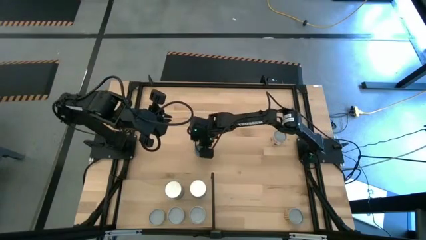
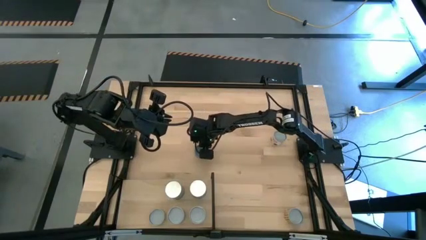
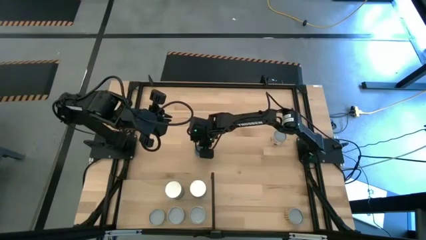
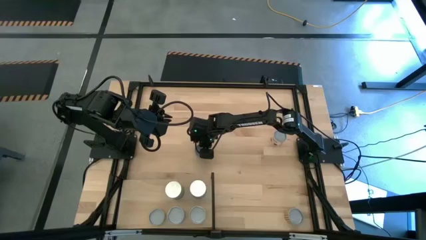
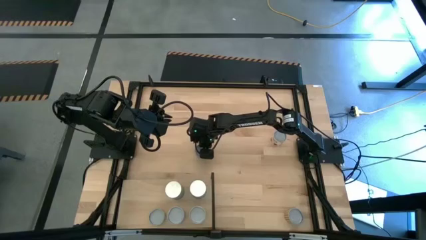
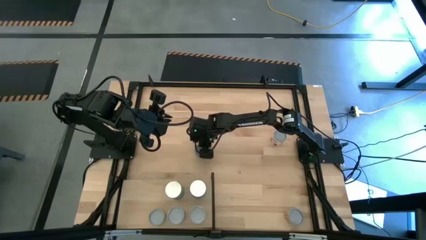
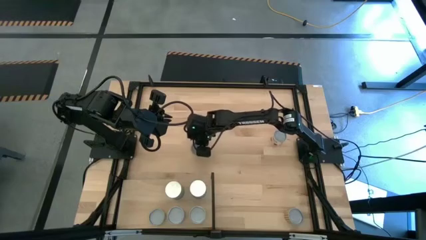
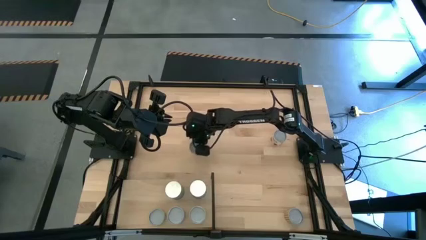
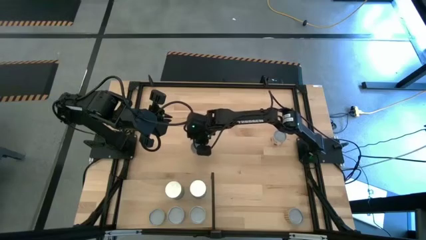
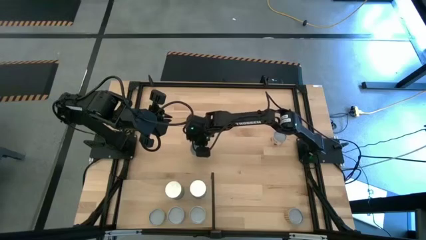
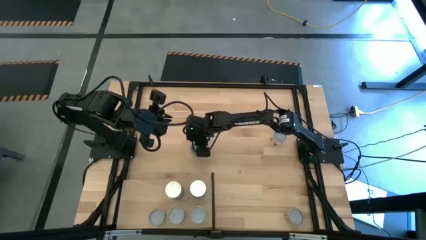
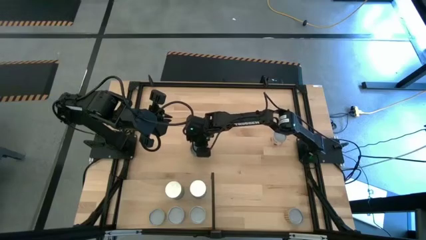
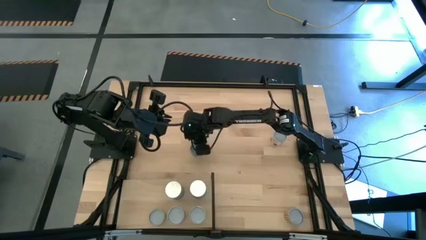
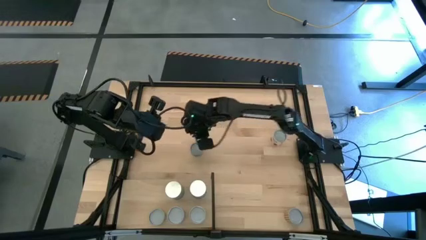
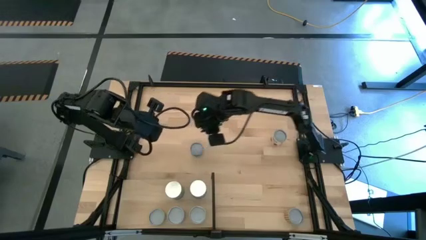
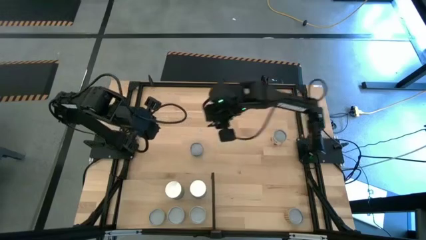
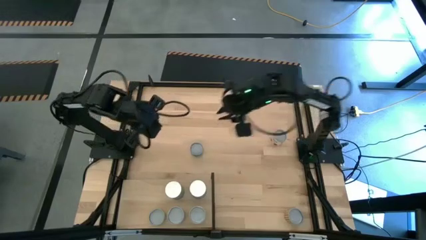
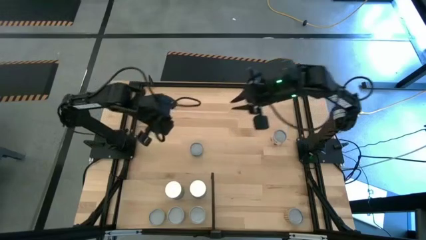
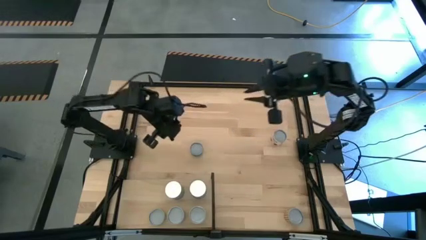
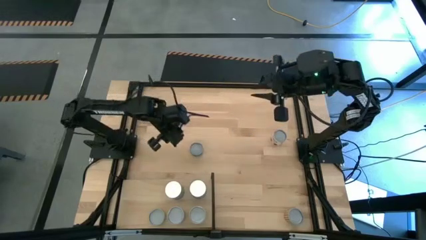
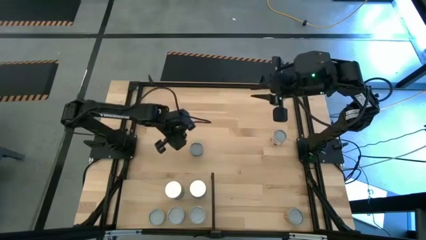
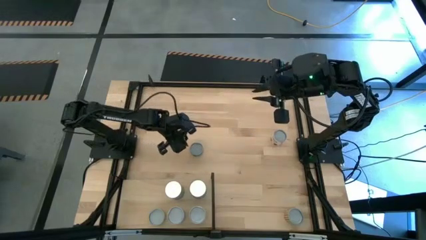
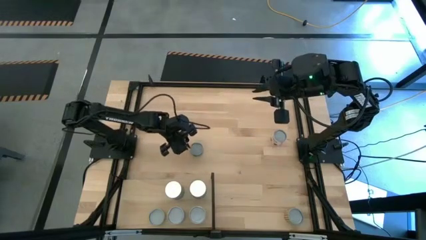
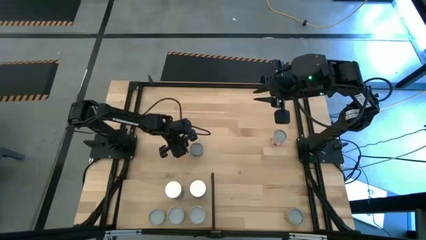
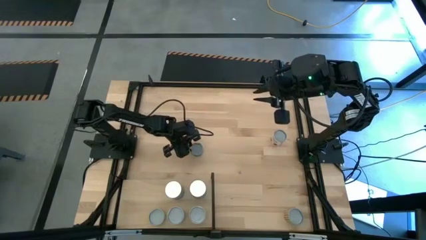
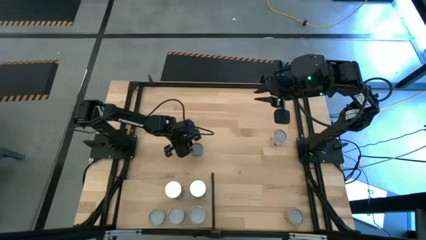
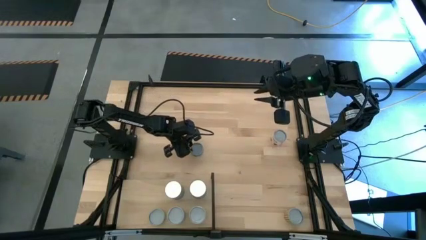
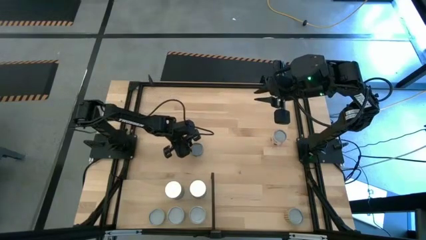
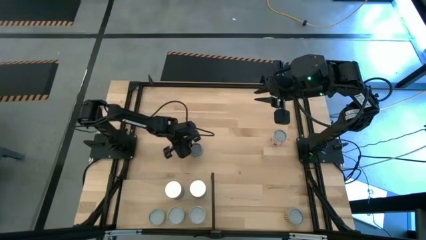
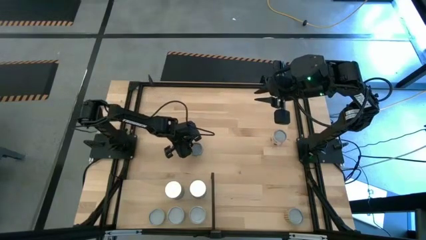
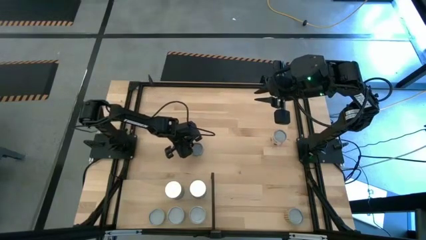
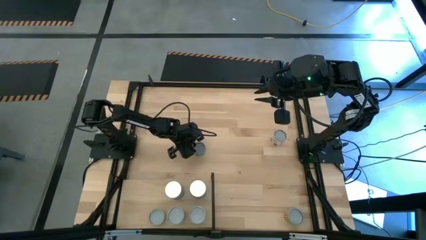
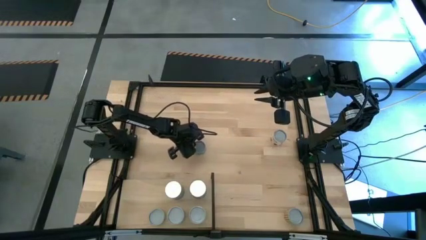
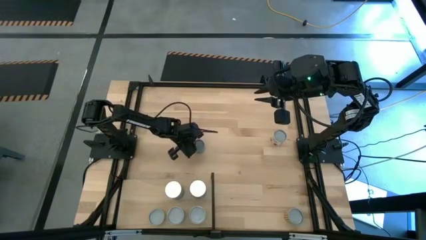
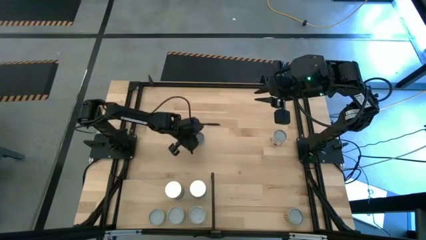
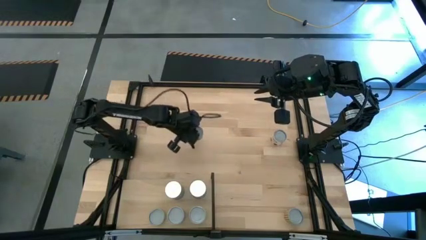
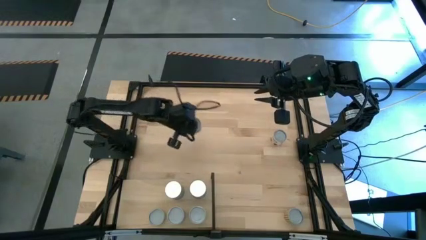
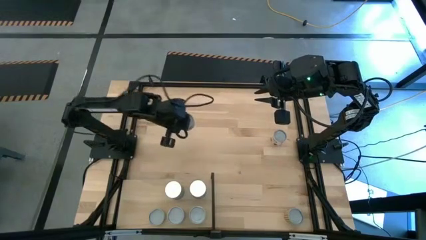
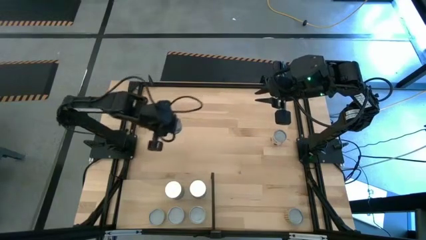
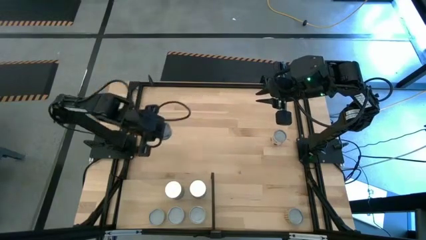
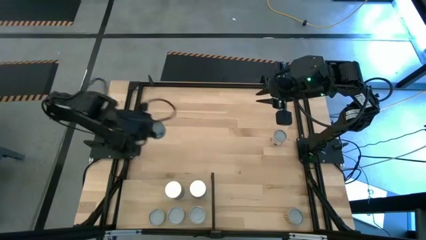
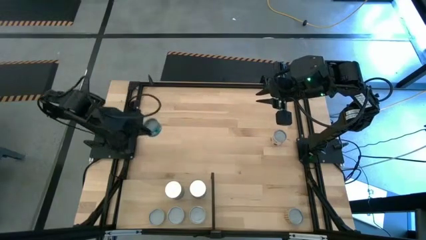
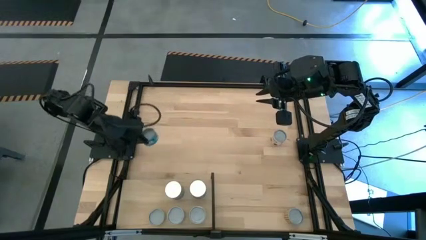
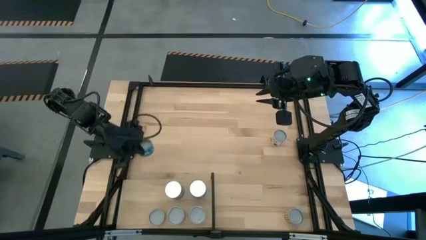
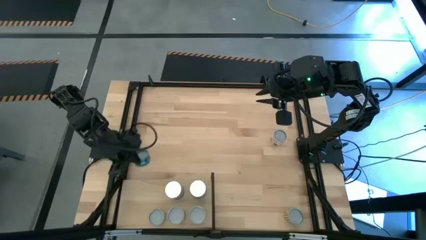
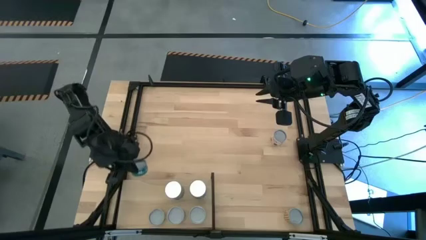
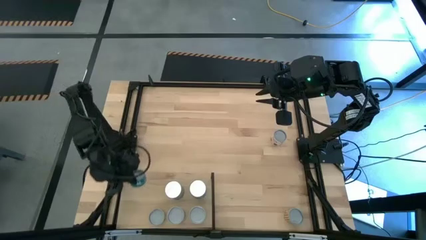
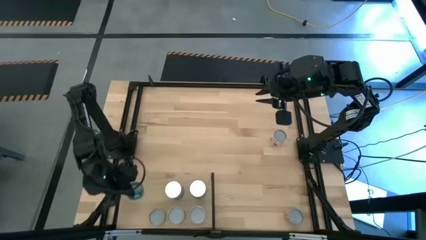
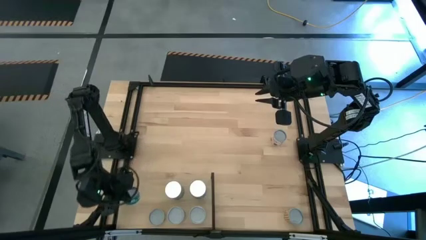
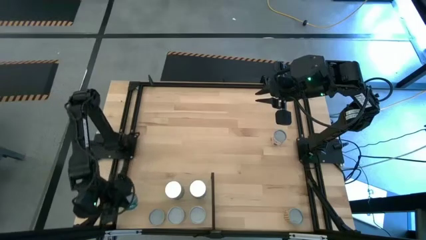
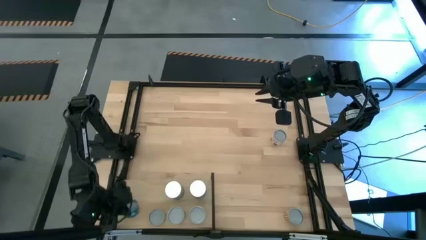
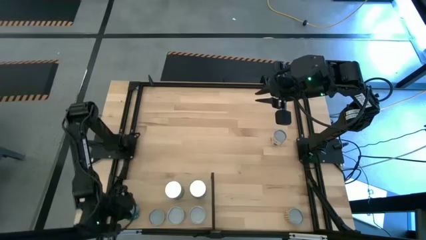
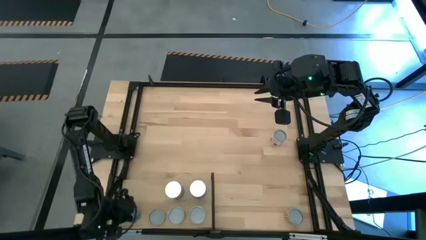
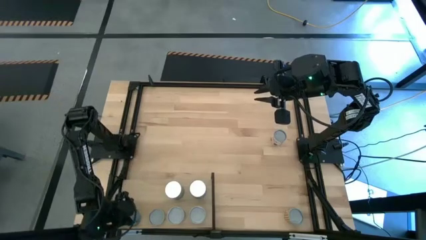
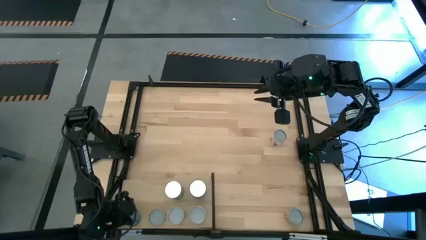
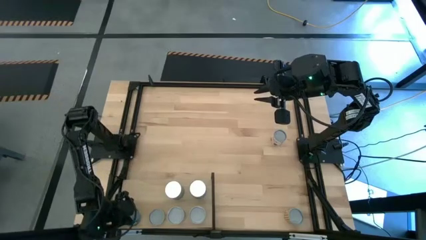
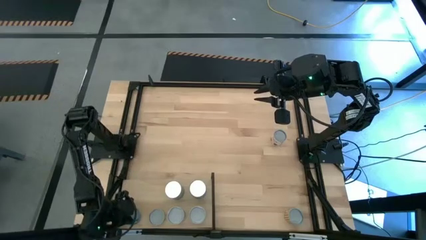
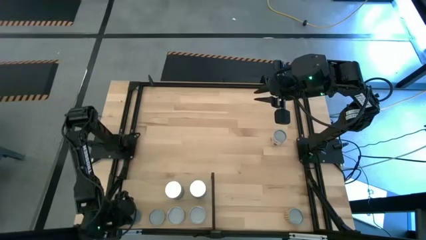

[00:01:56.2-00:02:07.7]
Task: Pick and place cans onto a shelf
Put the canned tuna on the shelf

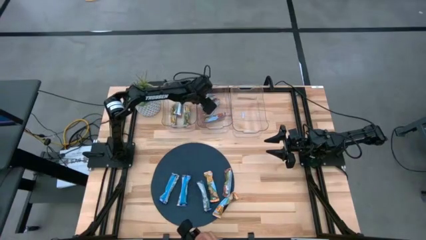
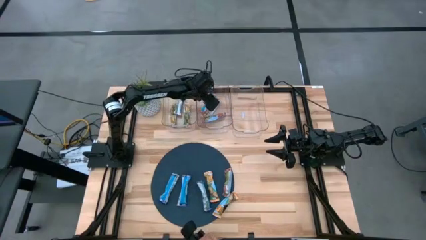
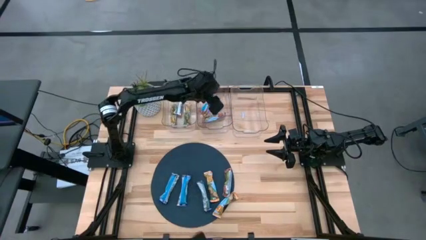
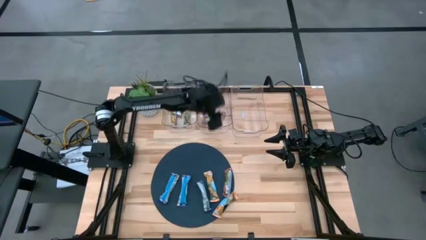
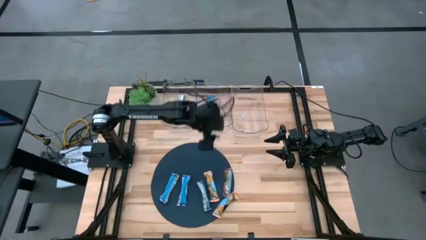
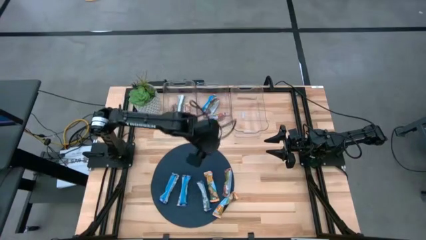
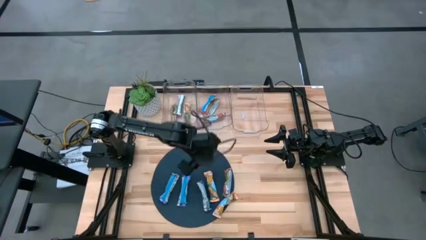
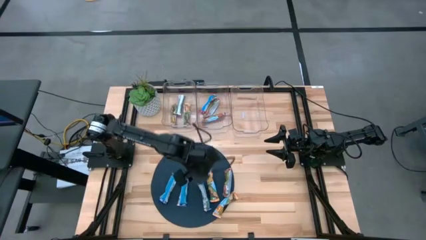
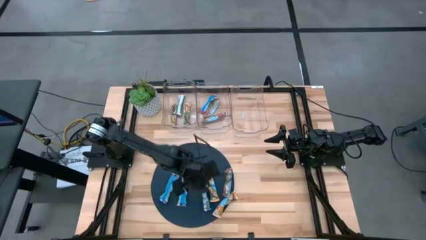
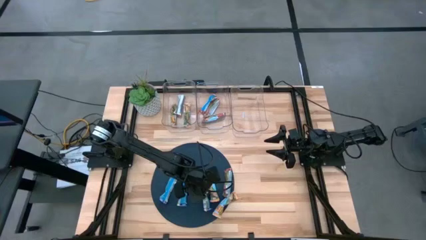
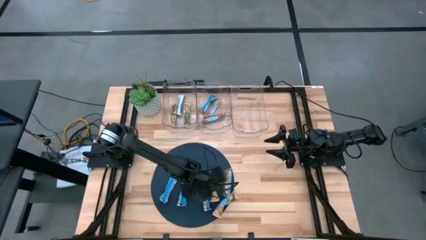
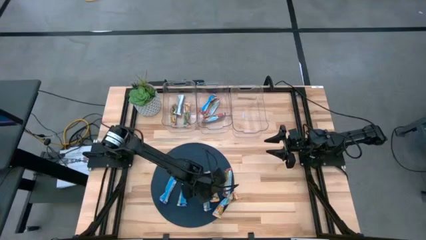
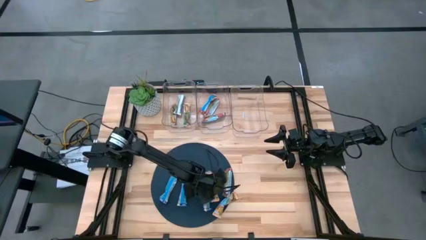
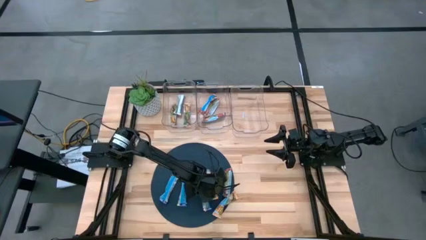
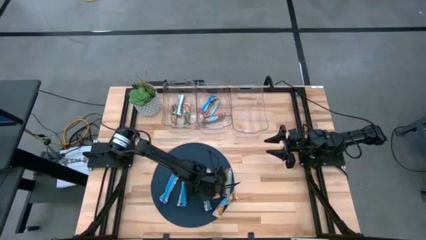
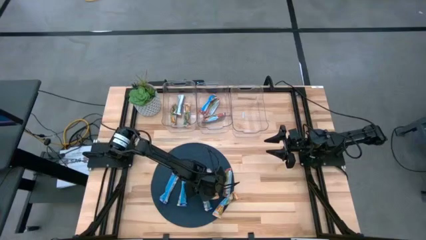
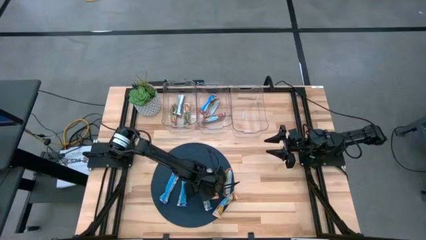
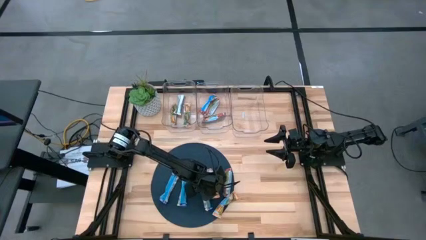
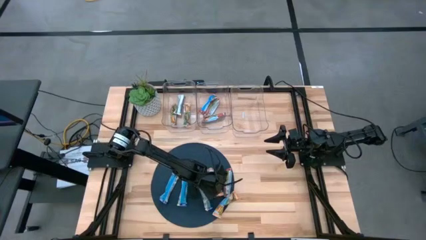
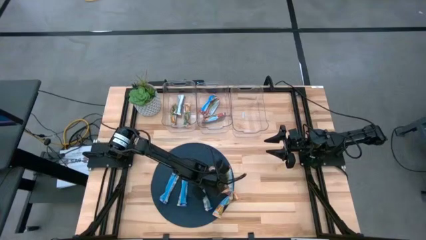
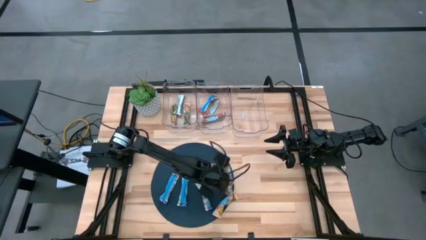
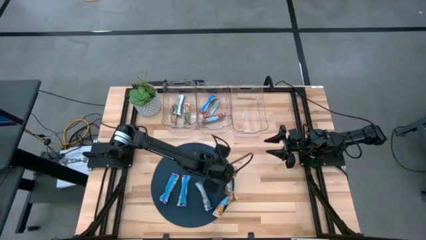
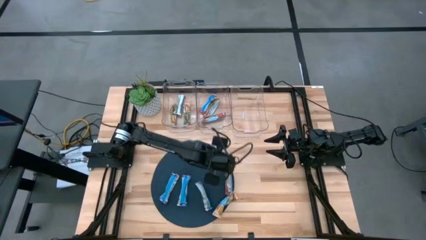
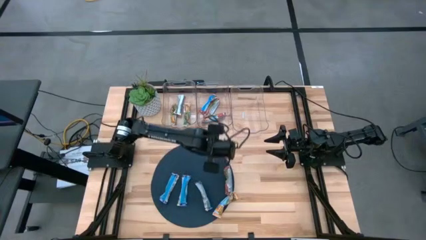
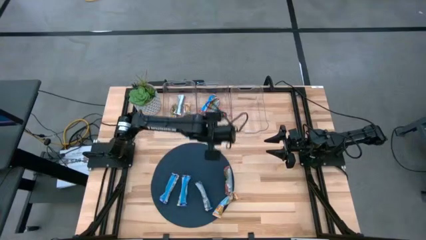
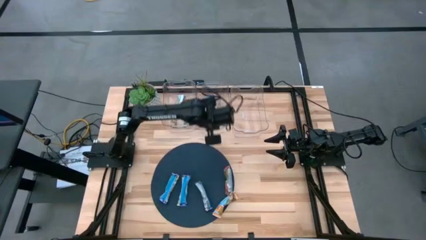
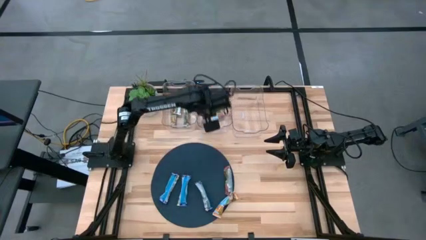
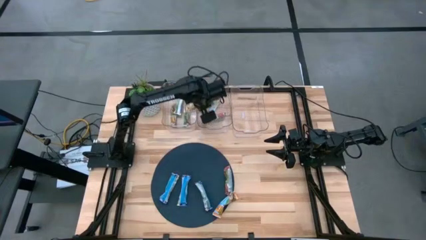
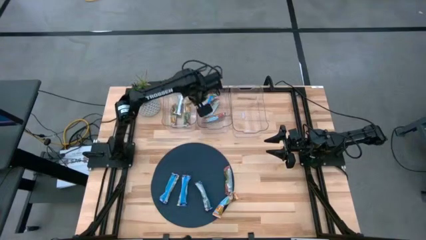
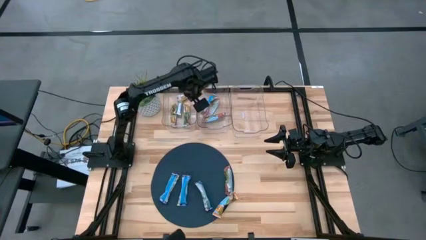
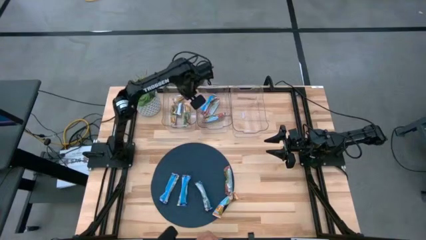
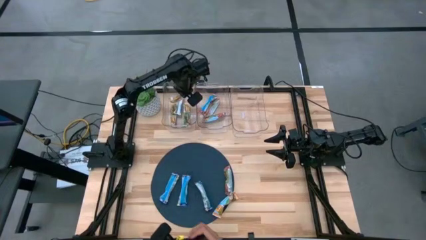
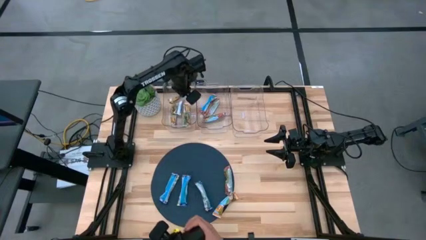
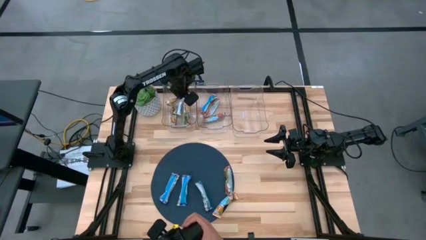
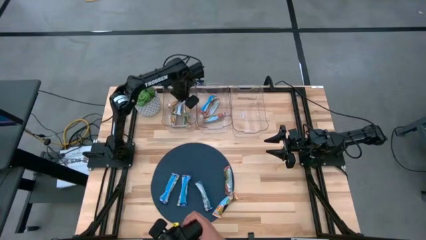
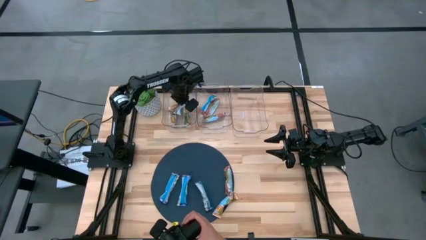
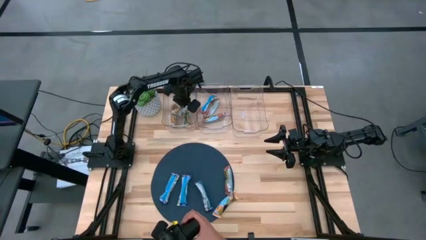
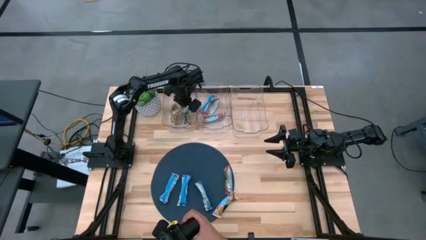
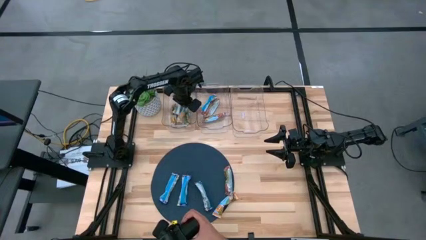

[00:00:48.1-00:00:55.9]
Task: Pick and place Granola Bars by type
Put the orange granola bar into the left transparent bin
